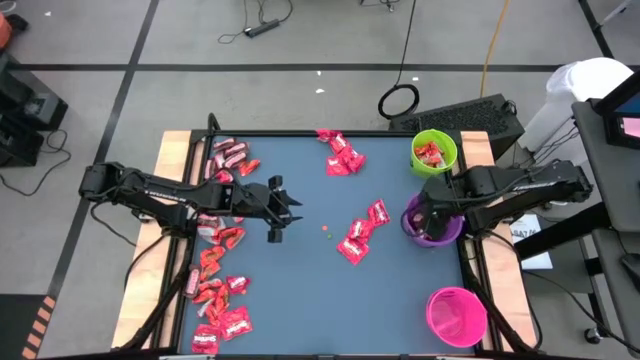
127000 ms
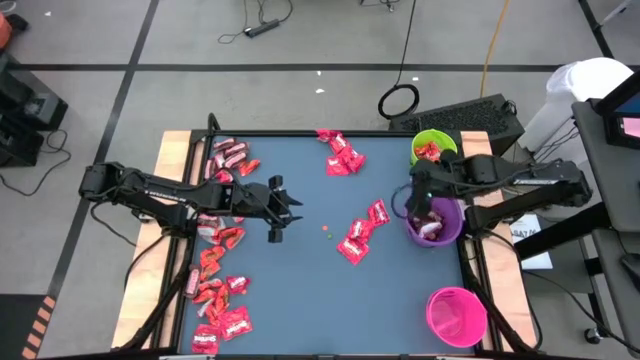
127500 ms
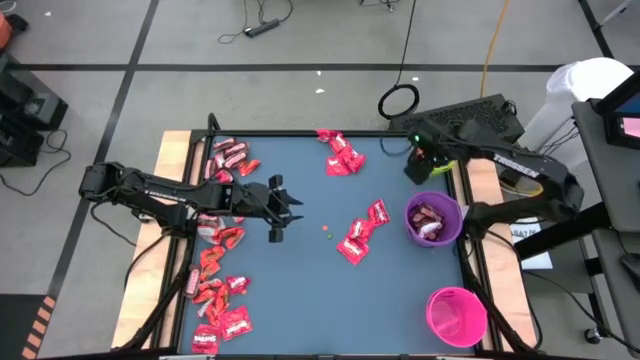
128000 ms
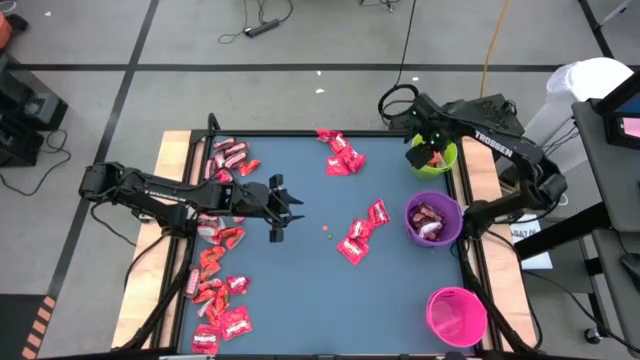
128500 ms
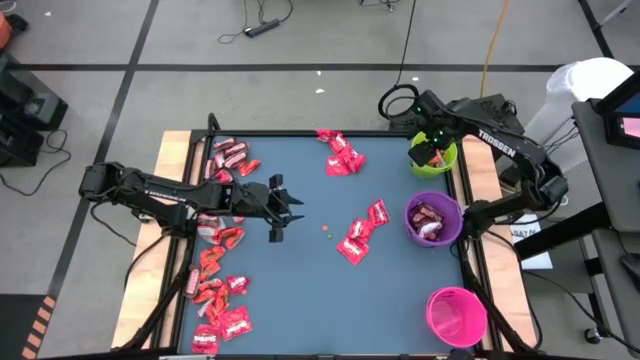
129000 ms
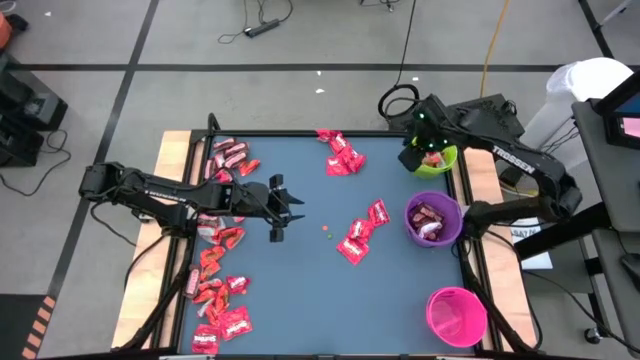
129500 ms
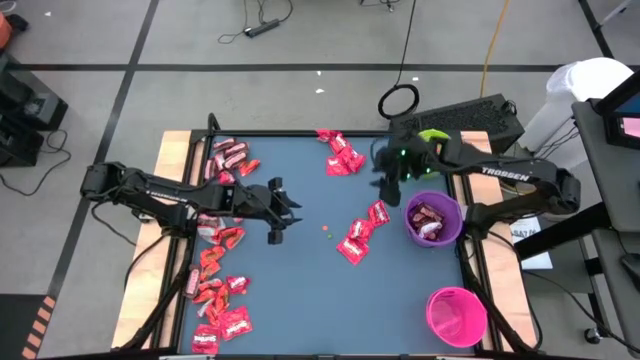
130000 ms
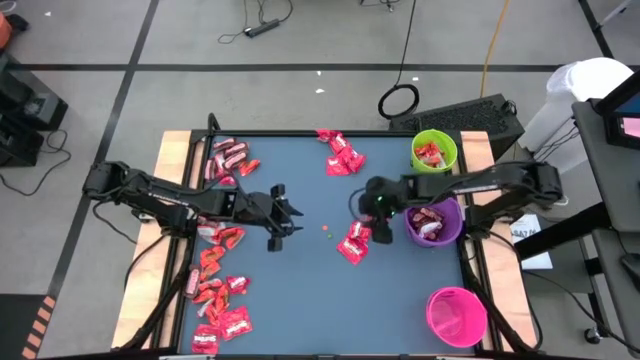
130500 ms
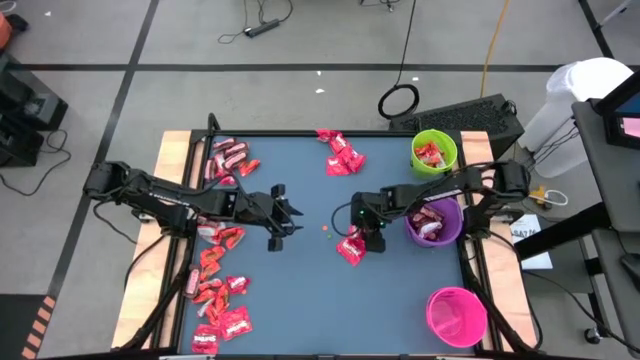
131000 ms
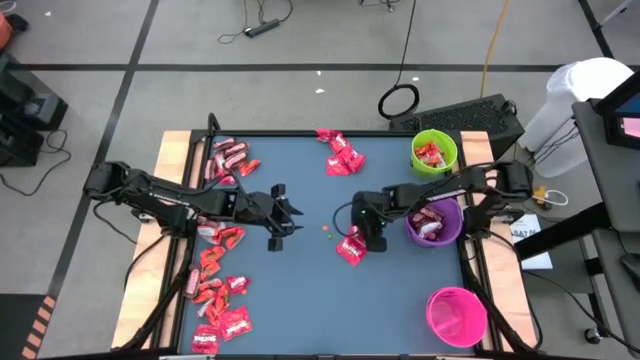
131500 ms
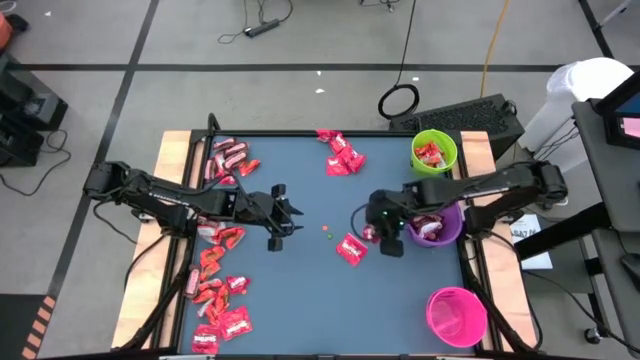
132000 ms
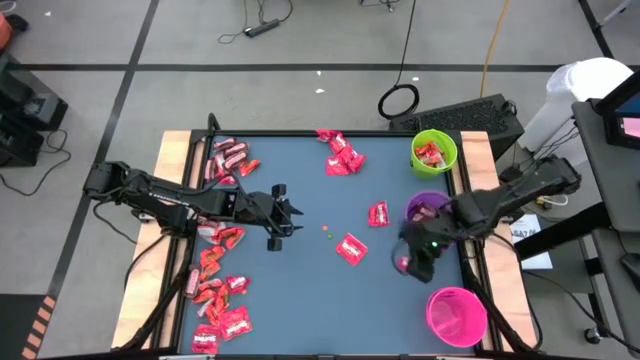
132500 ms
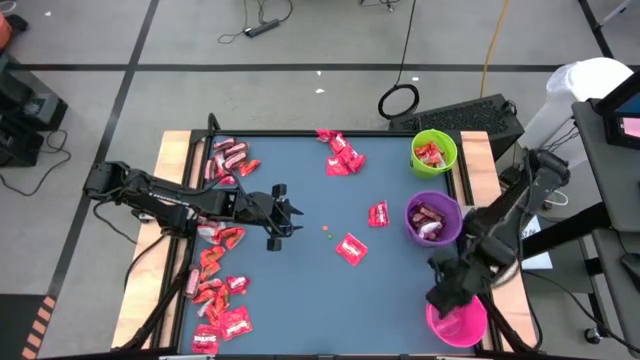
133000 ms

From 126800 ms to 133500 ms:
Task: Organize candy in baskets
Put the red candy pack into the pink bucket

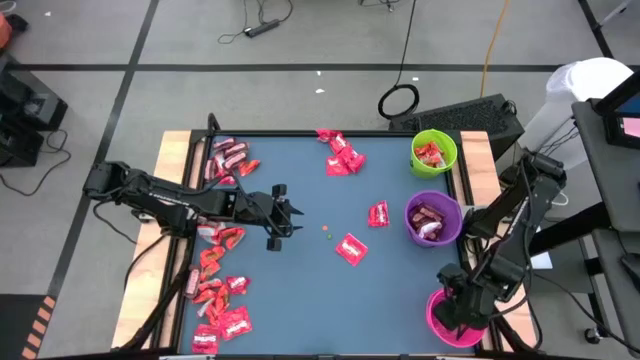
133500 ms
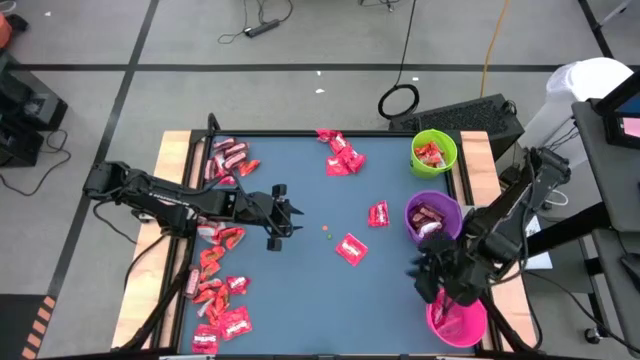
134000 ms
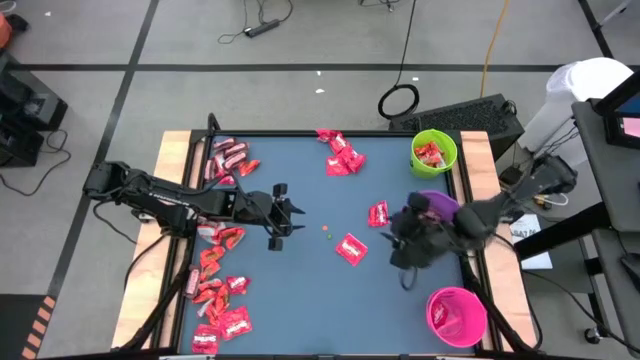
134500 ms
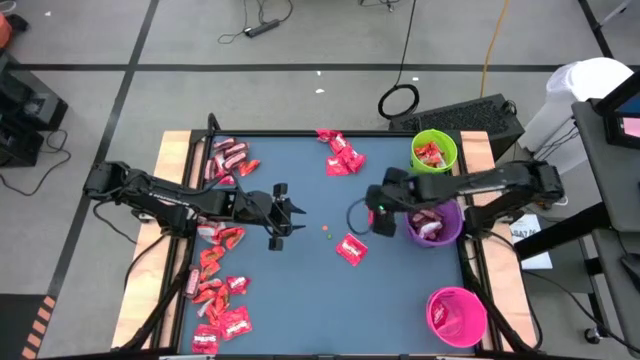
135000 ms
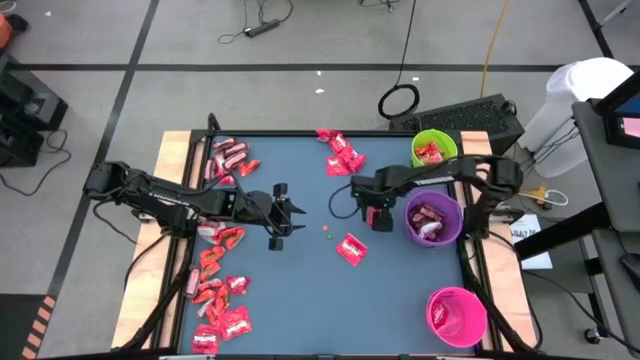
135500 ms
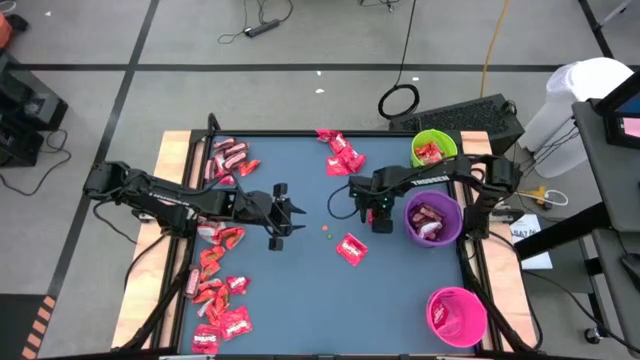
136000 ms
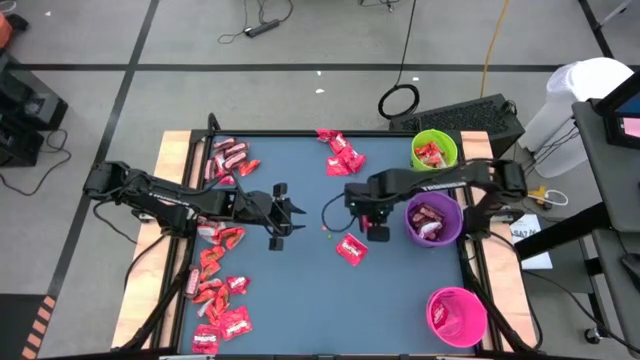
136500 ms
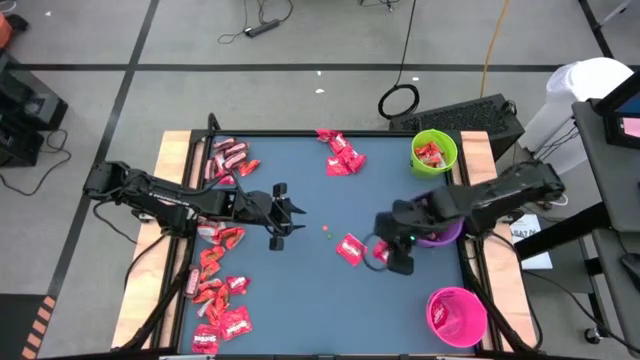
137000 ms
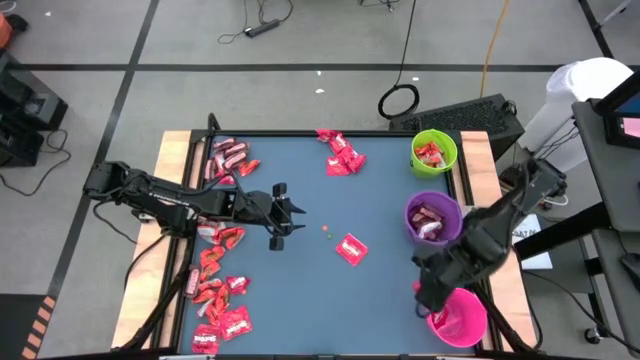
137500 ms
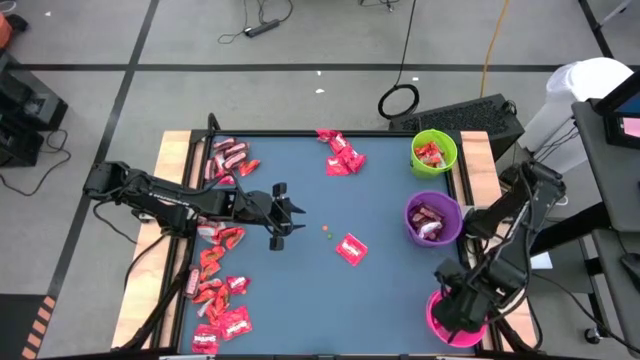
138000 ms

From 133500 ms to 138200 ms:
Put the red candy pack into the pink bucket

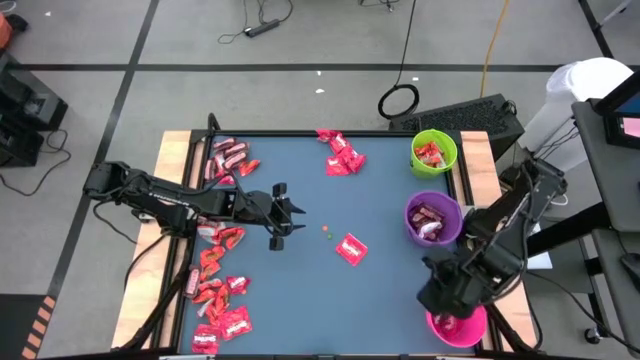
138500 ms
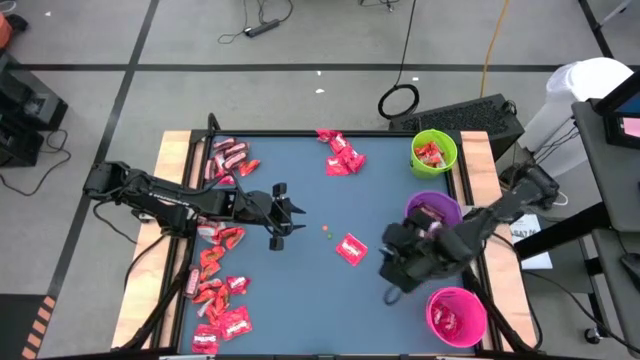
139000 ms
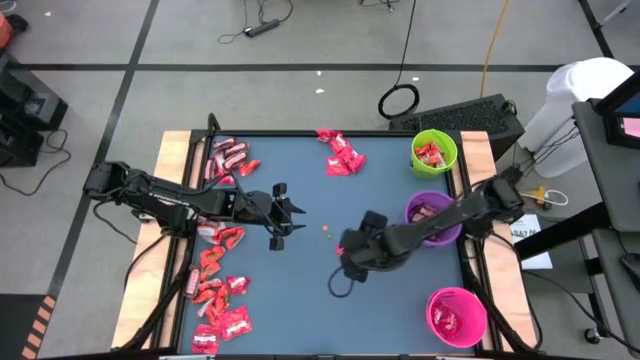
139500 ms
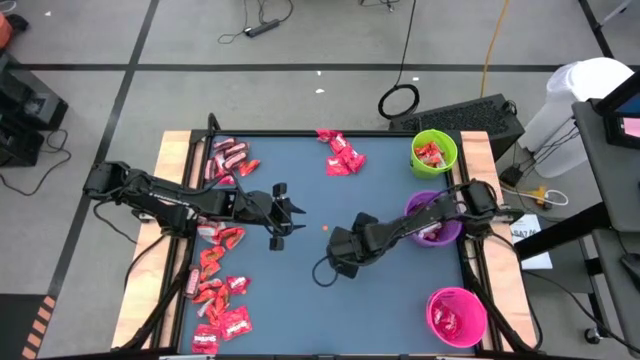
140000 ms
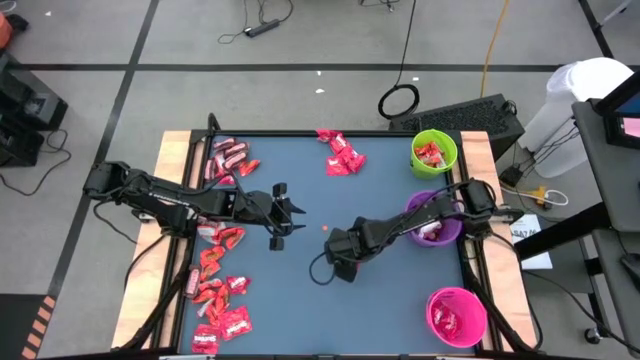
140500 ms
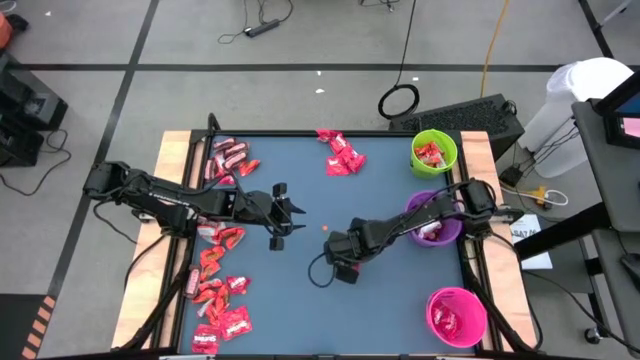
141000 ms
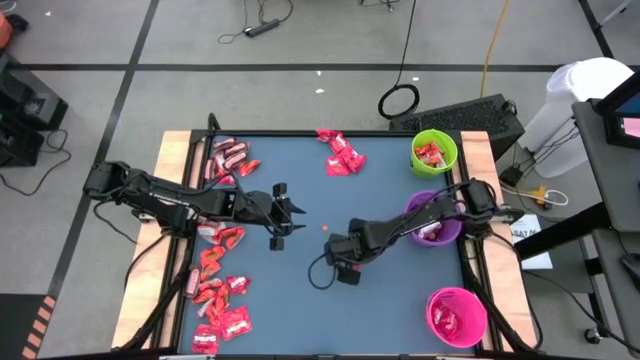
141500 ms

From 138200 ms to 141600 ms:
Put the red candy pack into the pink bucket

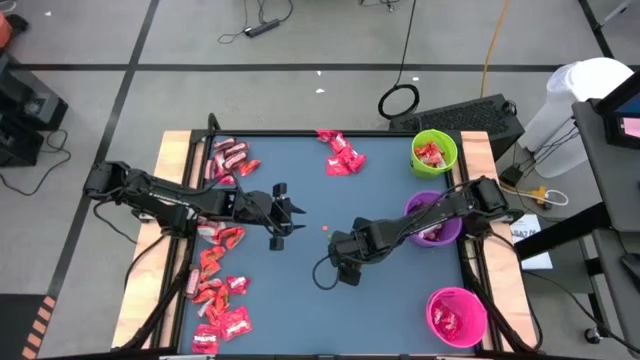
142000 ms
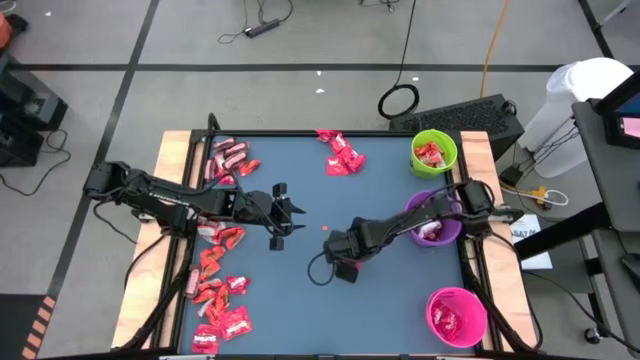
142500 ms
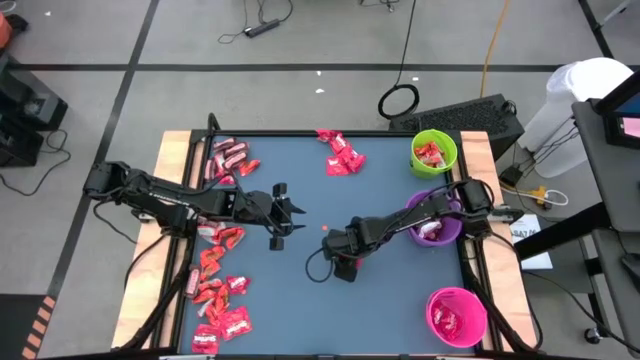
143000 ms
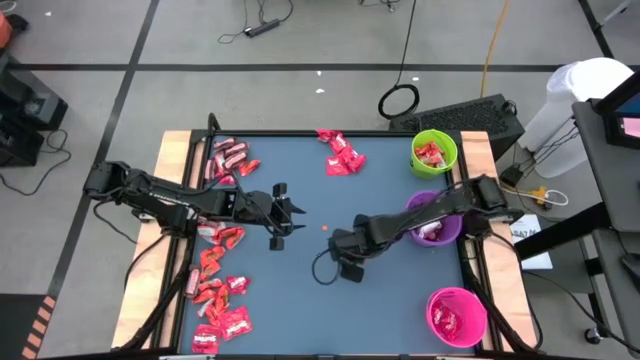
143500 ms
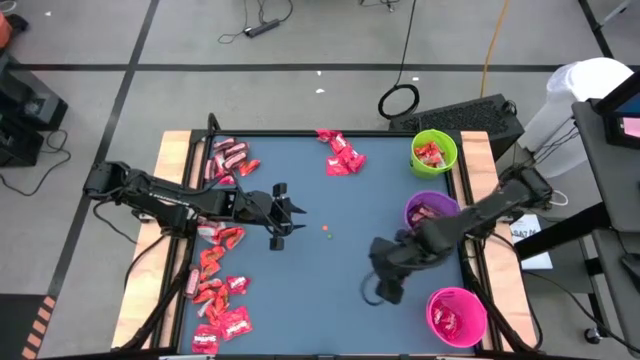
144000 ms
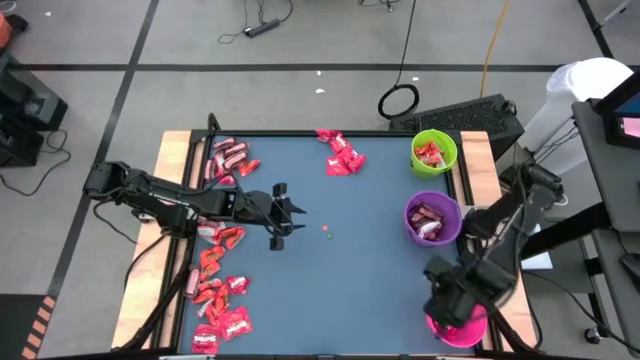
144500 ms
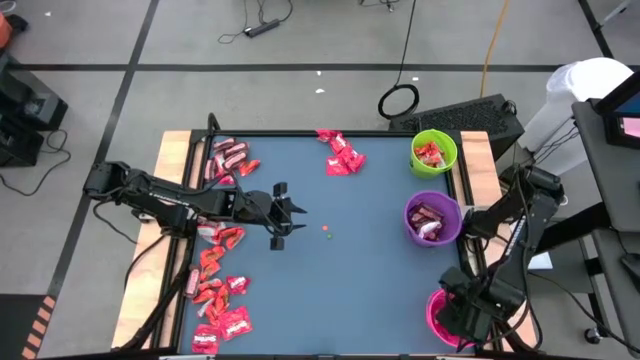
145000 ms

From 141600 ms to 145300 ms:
Put the red candy pack into the pink bucket
